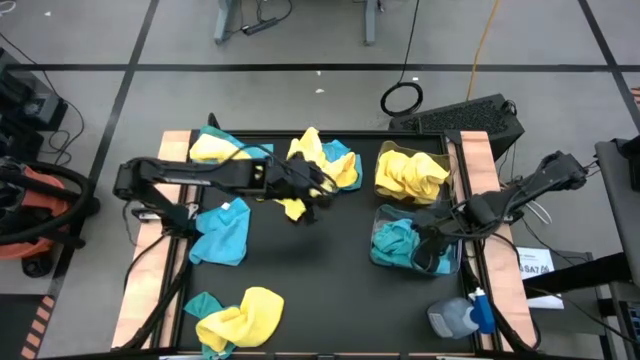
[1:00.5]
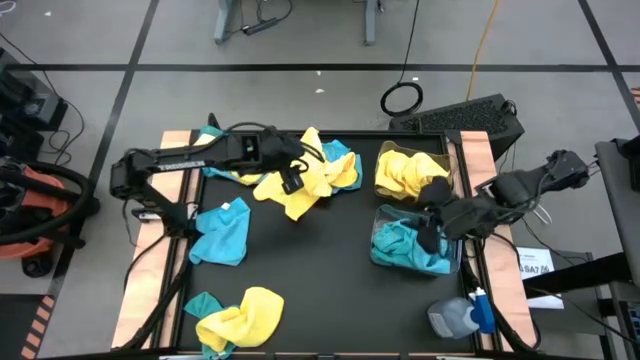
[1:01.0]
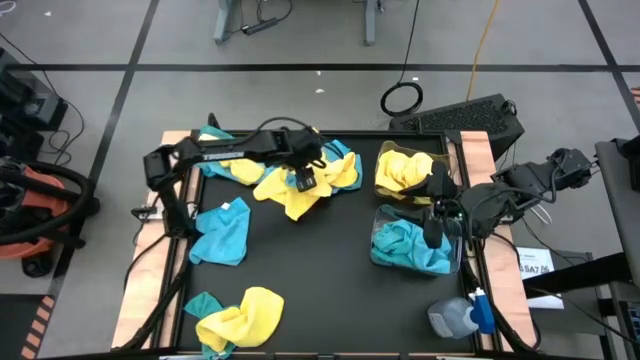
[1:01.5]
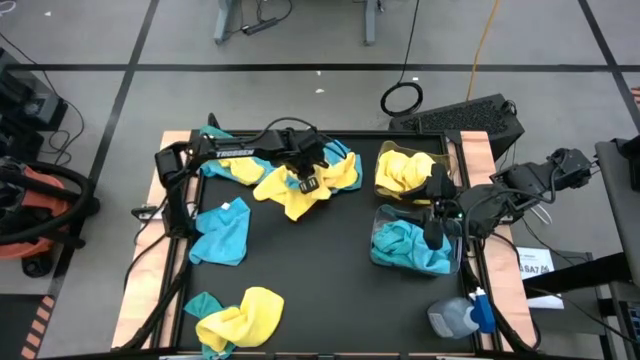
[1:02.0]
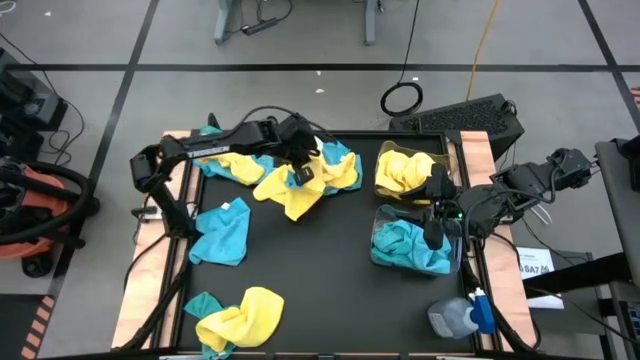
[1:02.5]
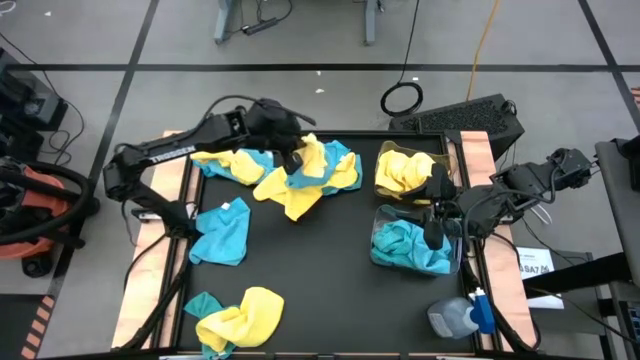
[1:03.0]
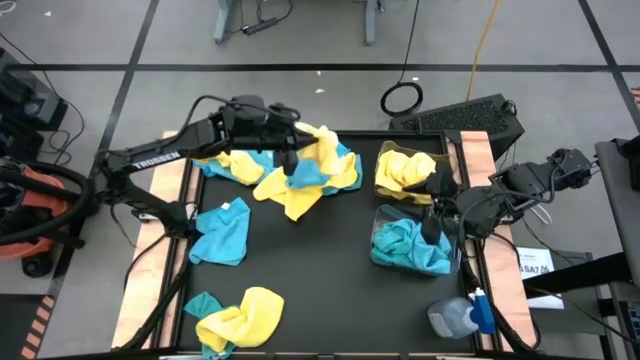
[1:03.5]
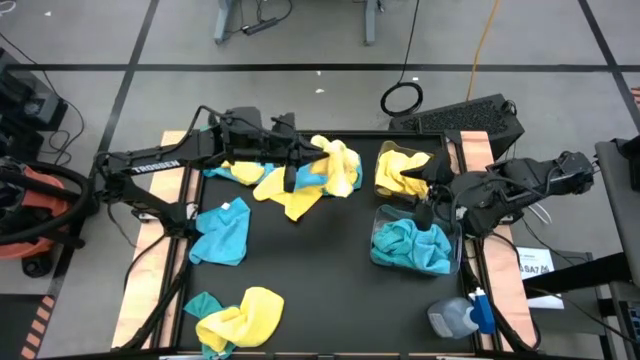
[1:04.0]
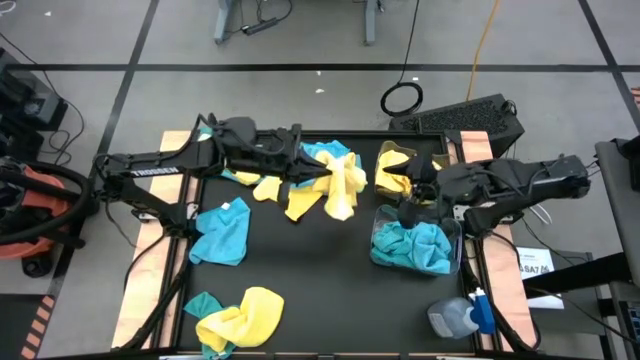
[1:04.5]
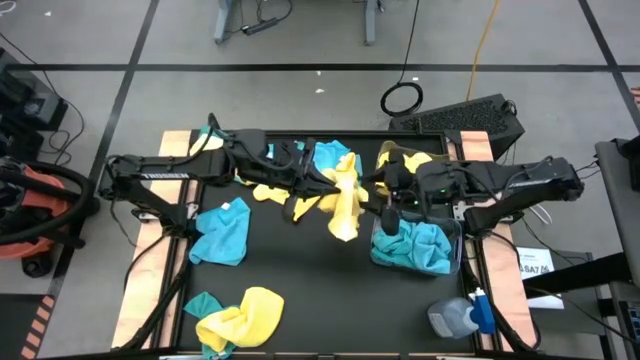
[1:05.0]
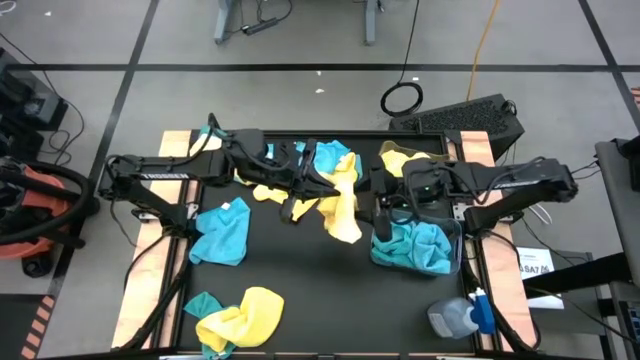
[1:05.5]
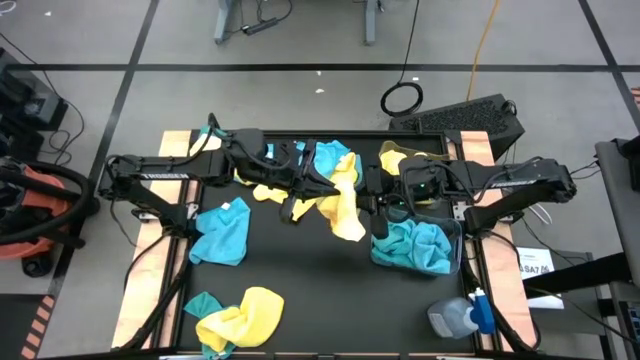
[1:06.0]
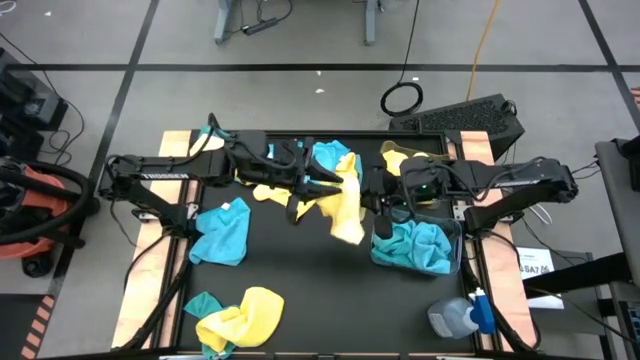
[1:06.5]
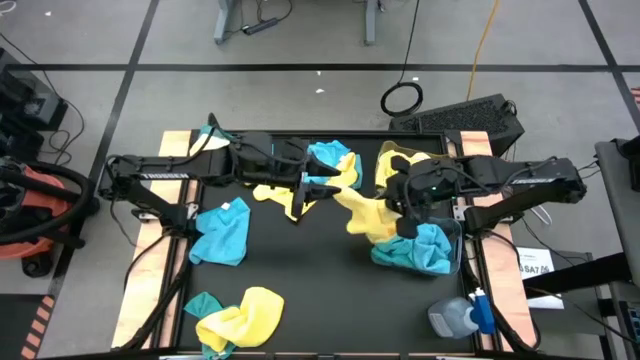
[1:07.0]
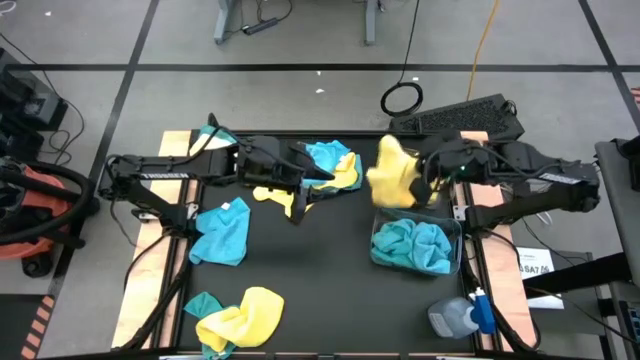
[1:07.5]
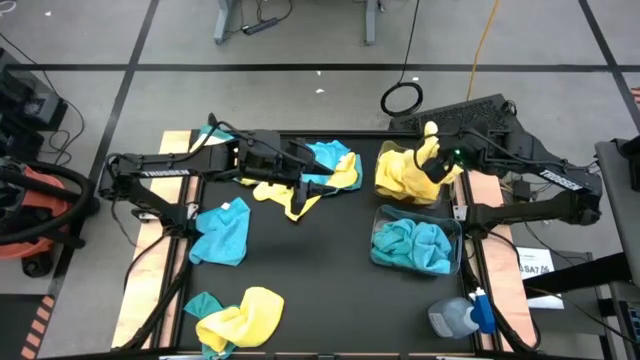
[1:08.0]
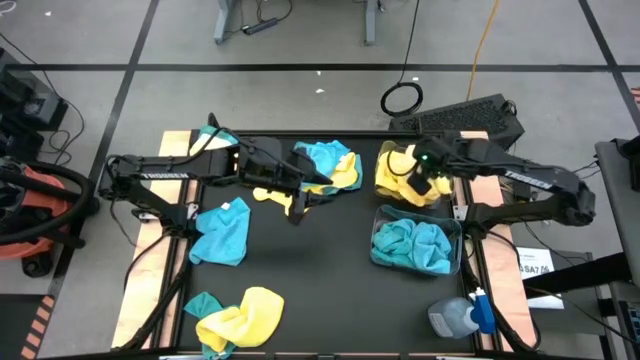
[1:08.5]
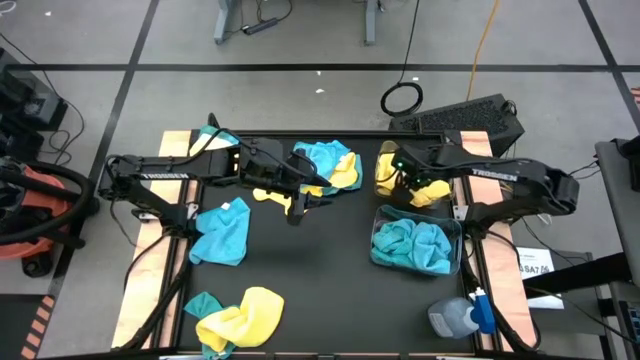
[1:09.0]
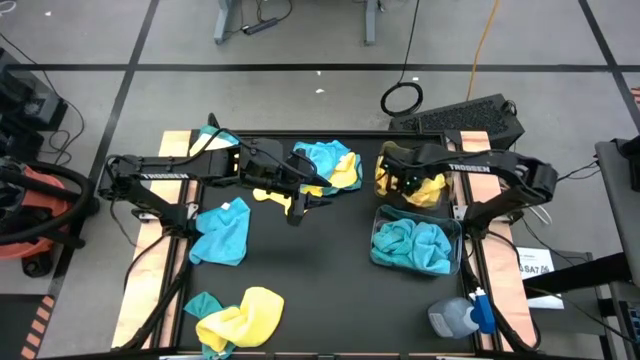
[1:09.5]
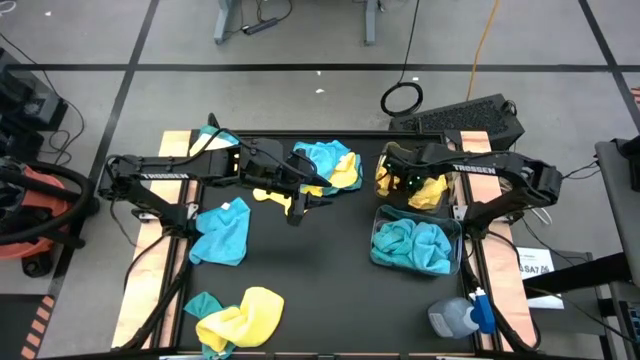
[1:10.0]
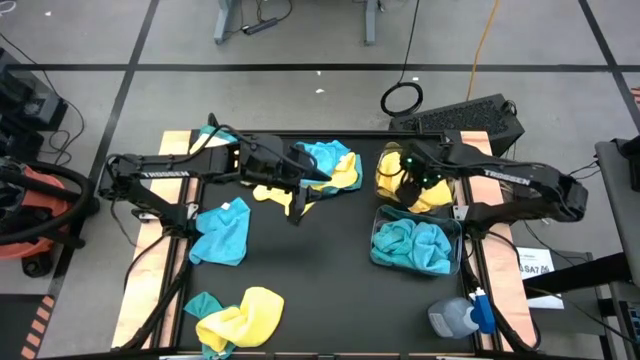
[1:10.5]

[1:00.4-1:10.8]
Task: Sort microfiber towel by color & place in baskets
Put the yellow microfiber cloth into the top transparent bin

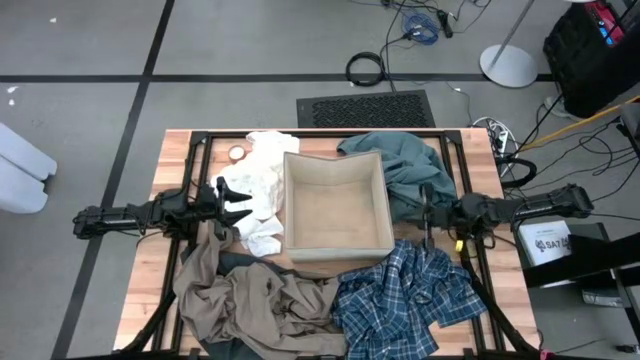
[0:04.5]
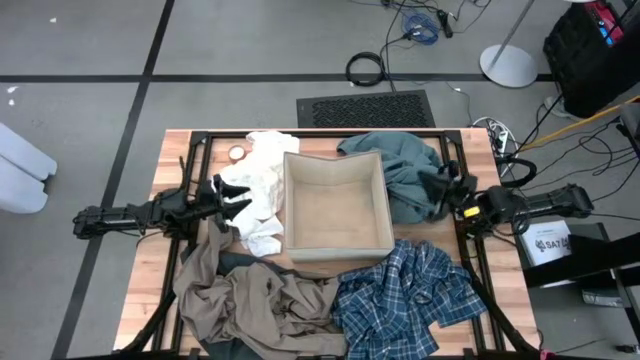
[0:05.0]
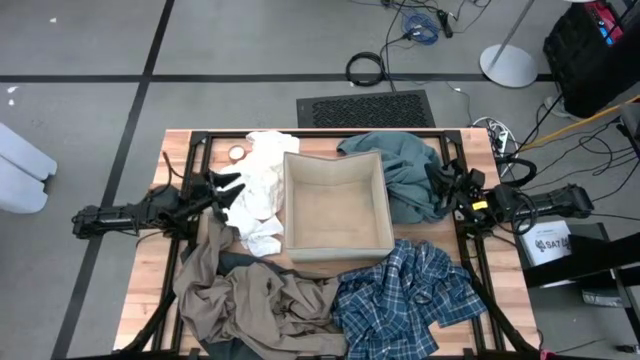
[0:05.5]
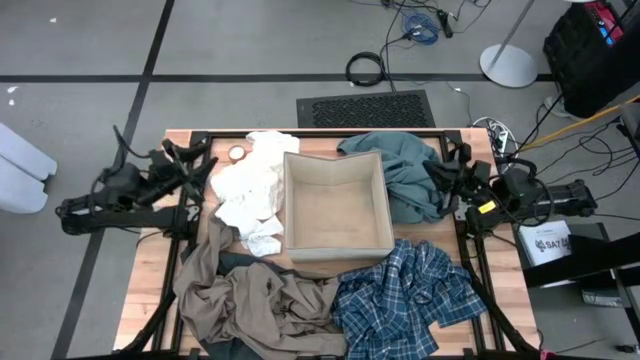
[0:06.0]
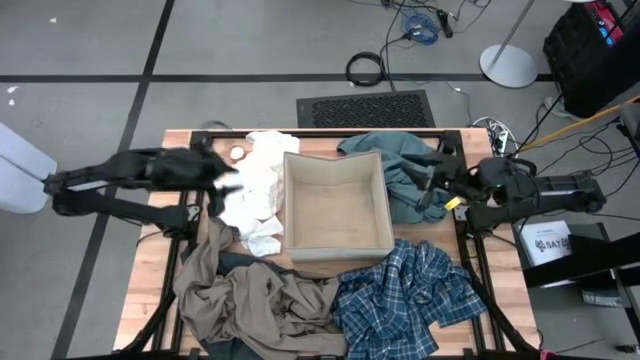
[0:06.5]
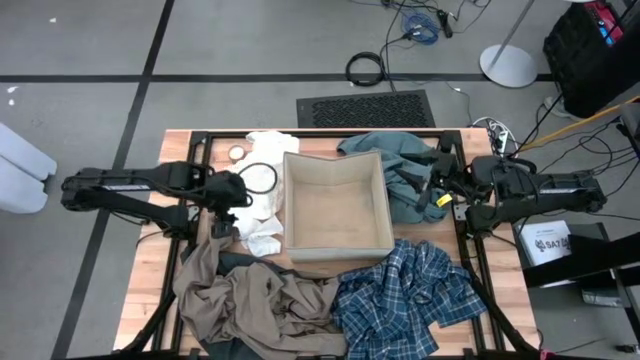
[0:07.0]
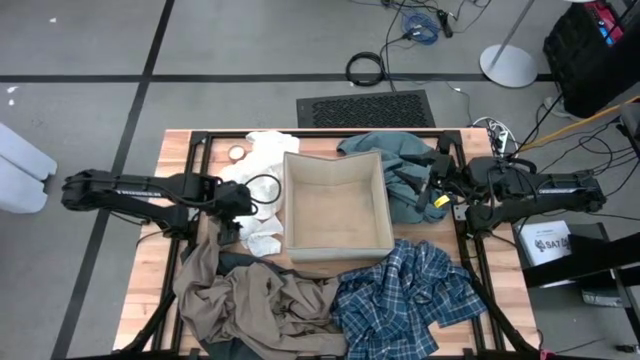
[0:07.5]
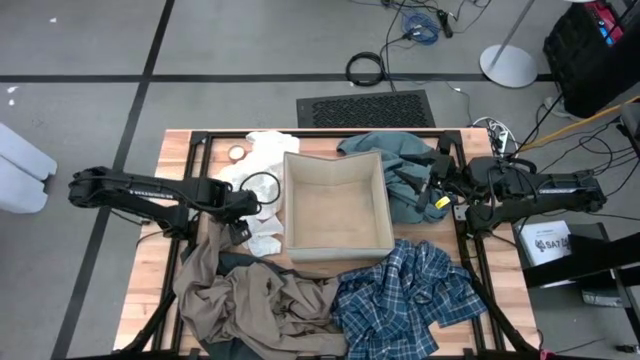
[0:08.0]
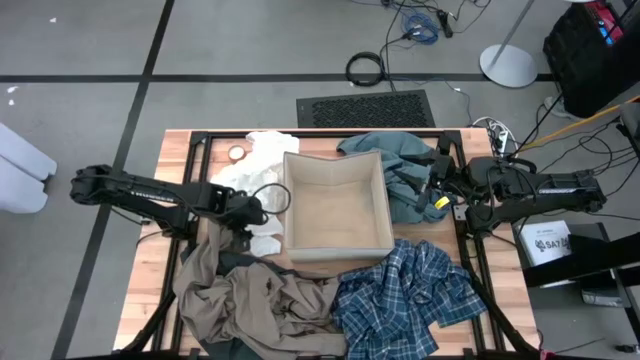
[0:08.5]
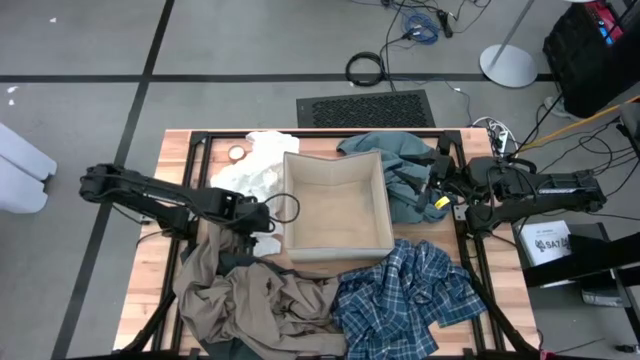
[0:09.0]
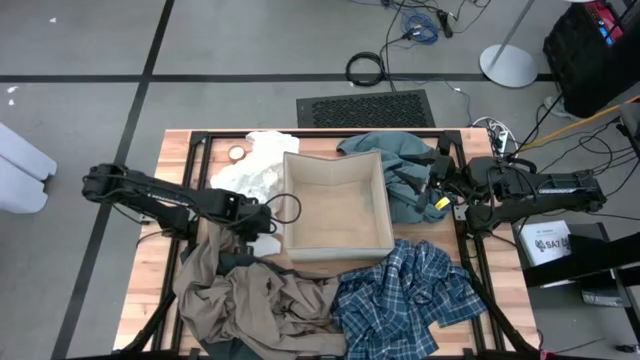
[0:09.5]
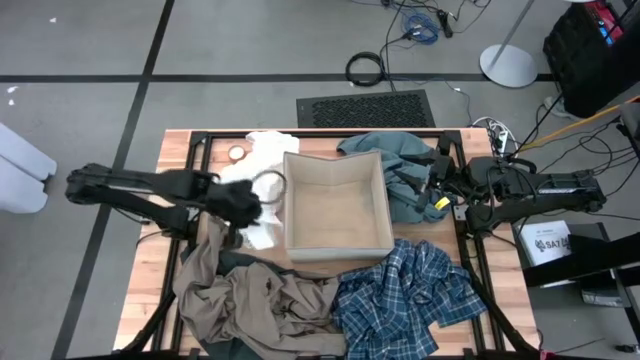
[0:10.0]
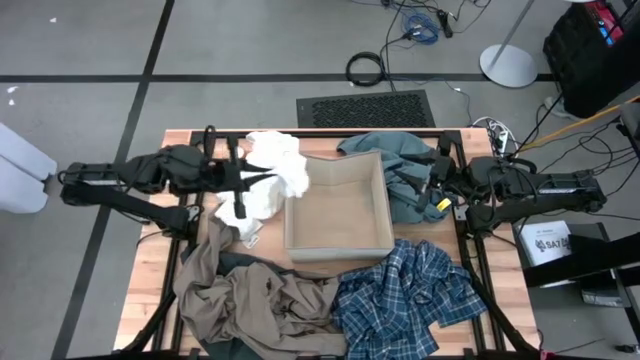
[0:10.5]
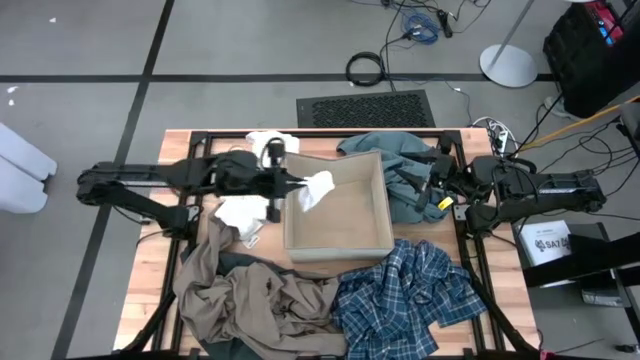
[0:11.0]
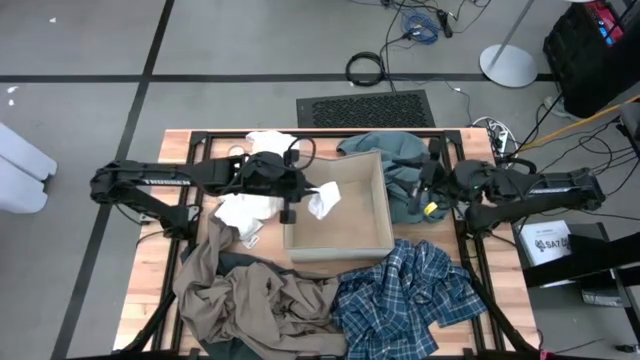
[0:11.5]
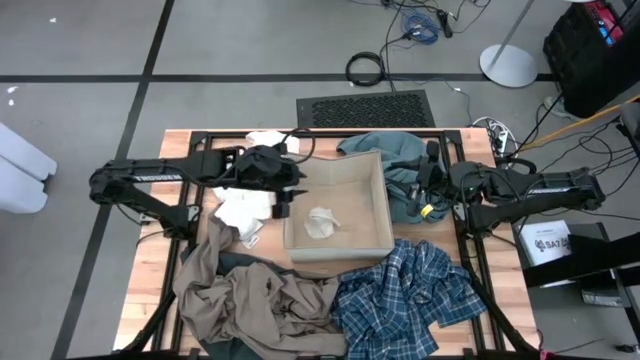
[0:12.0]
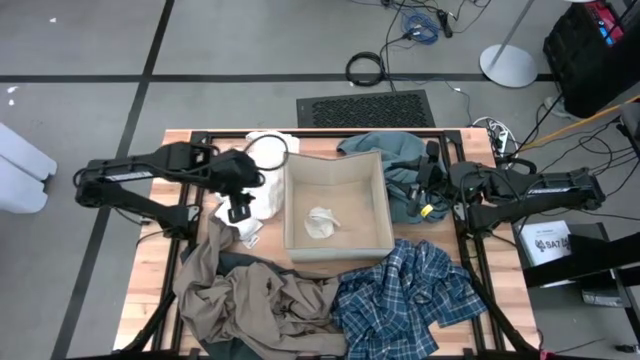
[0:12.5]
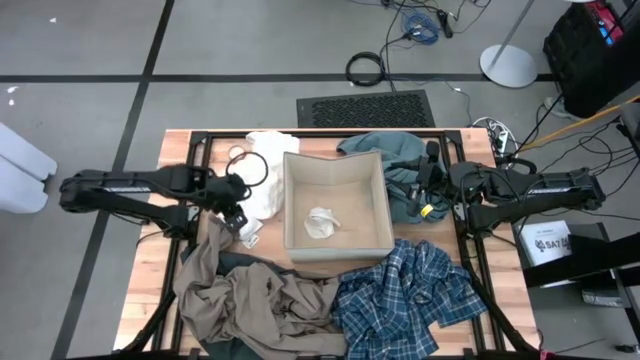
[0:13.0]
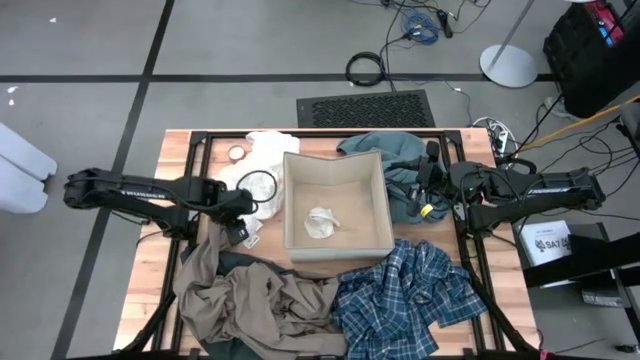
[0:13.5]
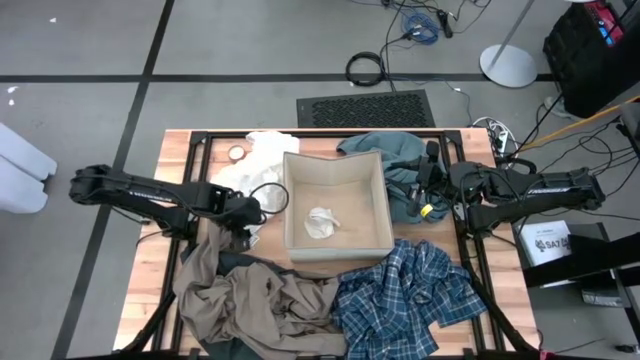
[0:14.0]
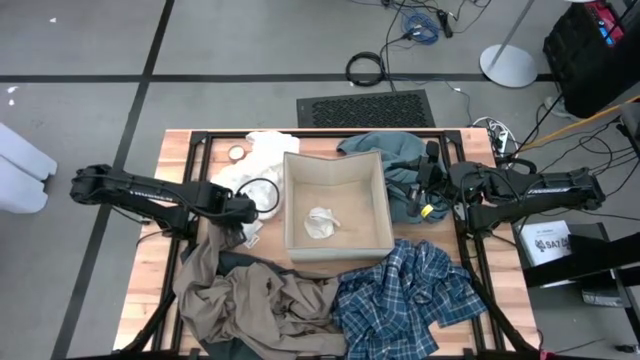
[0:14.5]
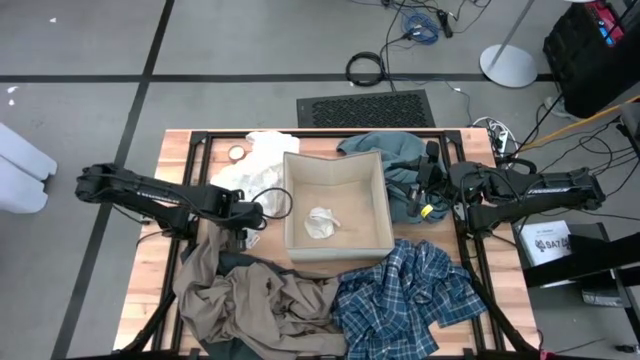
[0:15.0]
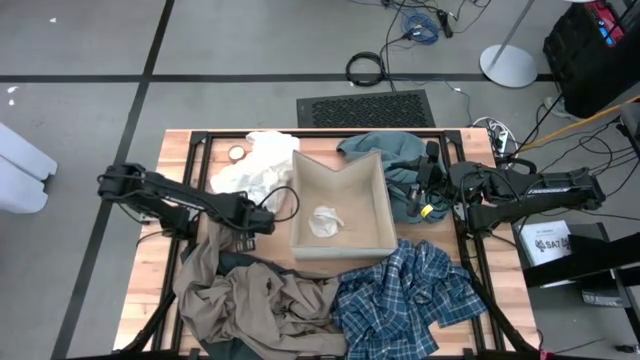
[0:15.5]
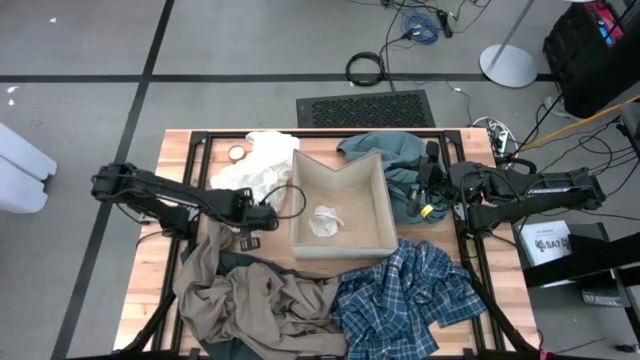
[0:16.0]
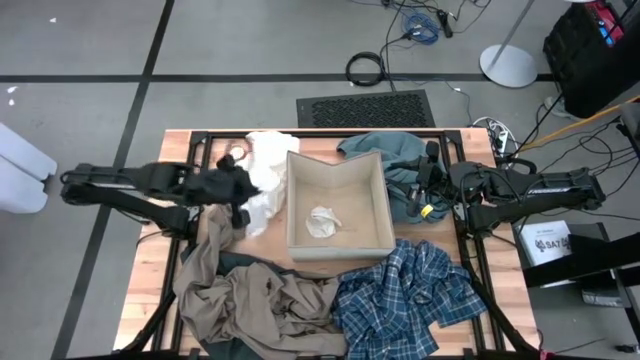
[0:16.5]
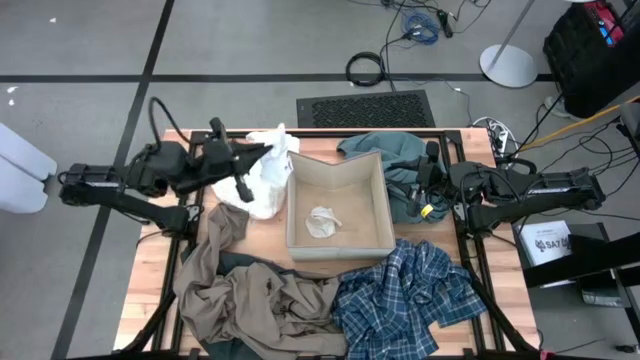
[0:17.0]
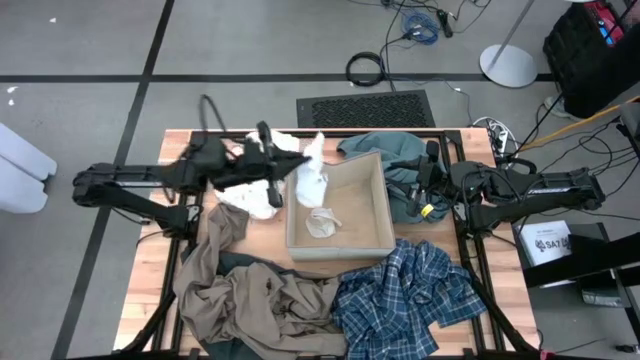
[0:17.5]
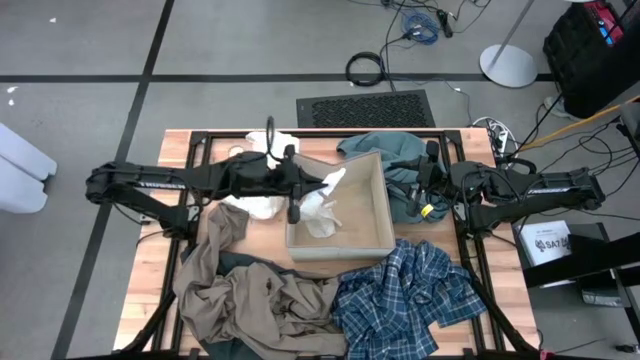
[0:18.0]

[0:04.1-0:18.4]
Task: Sort clothes
Put the white sock into the white laundry bin
